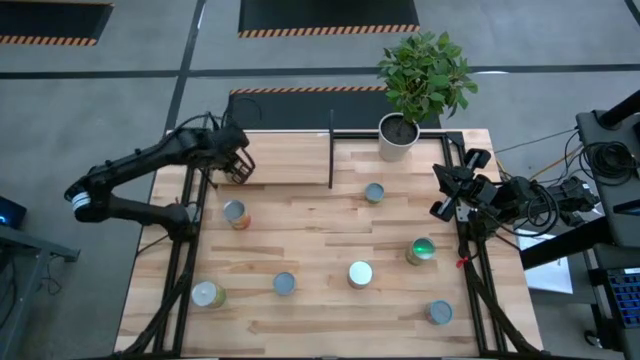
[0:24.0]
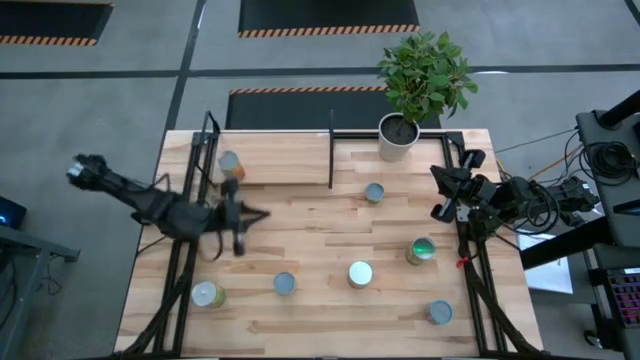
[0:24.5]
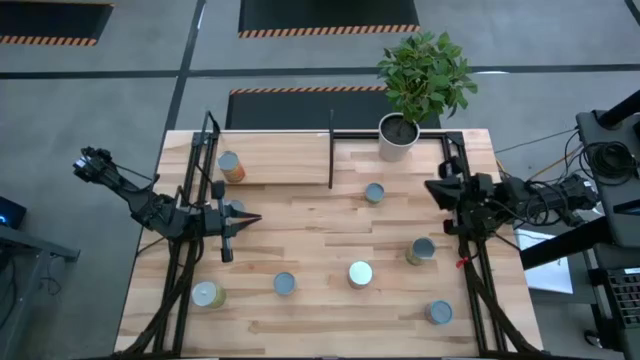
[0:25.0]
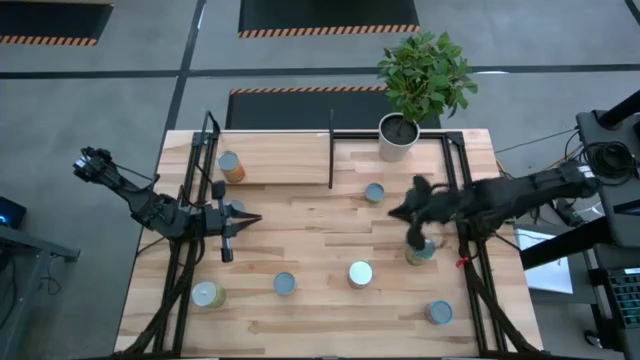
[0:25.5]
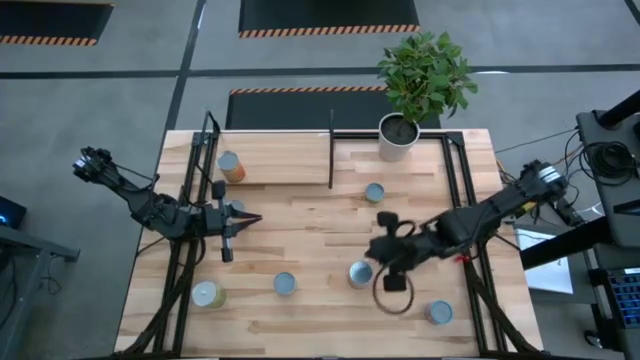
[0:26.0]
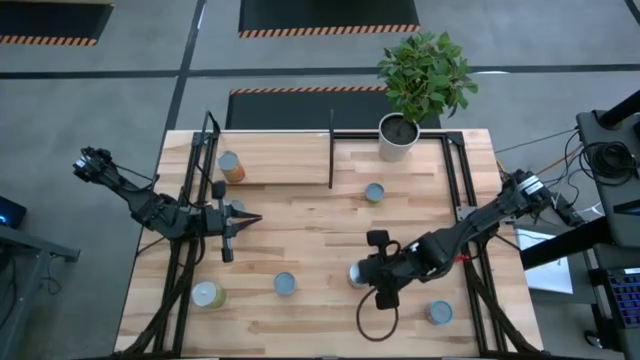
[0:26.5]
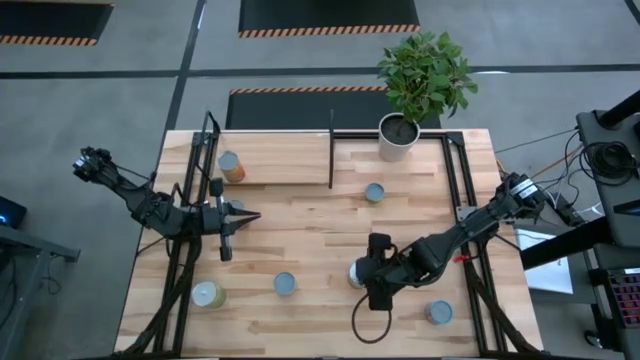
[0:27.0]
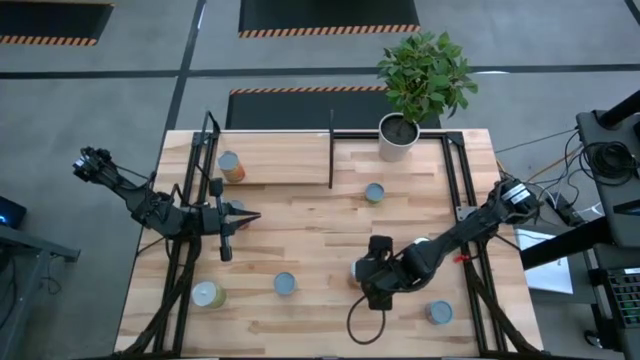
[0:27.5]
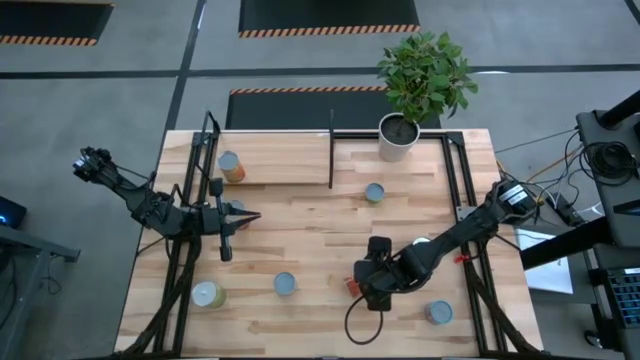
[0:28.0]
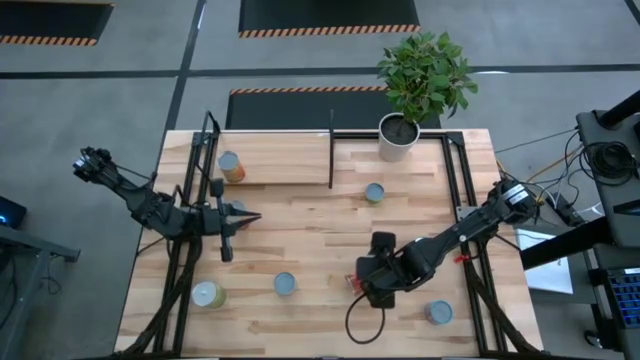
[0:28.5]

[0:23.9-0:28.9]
Task: Pick and place cans onto a shelf
Put the right orange corn can on the shelf

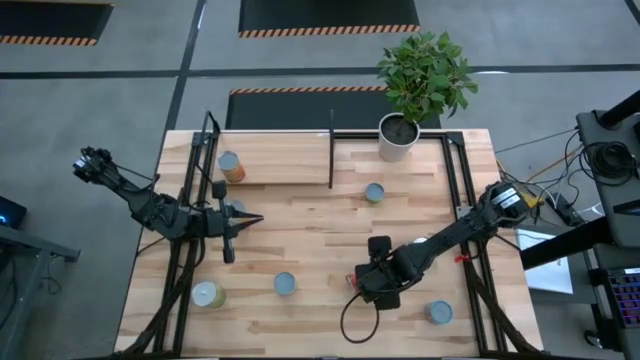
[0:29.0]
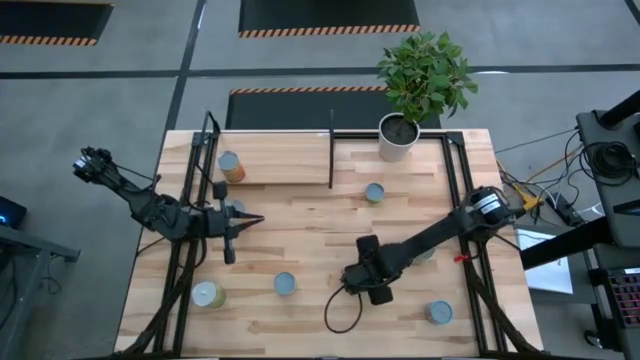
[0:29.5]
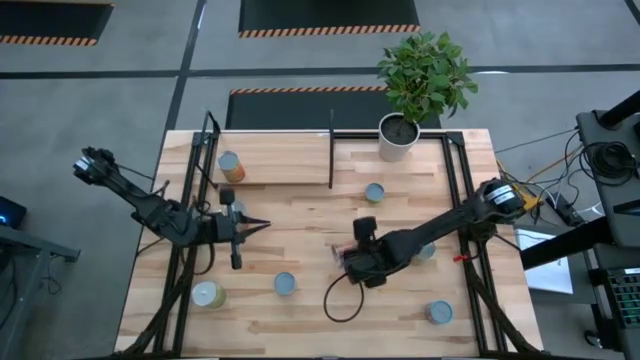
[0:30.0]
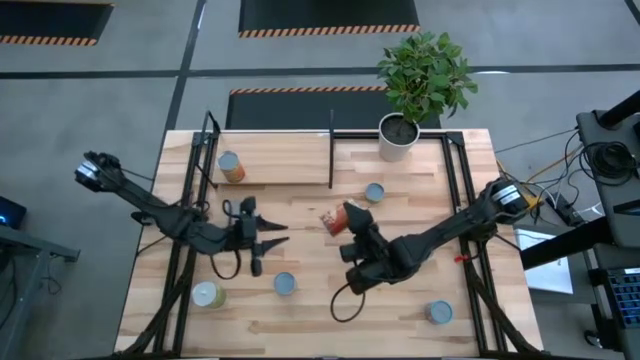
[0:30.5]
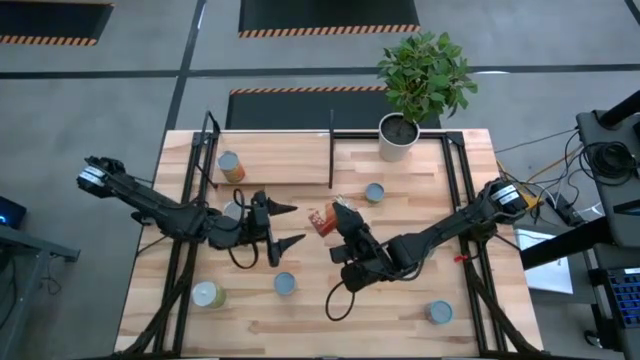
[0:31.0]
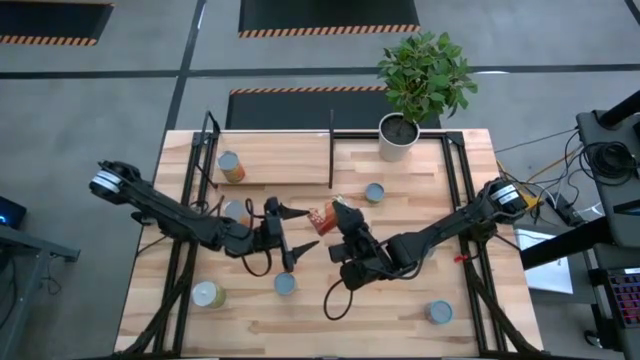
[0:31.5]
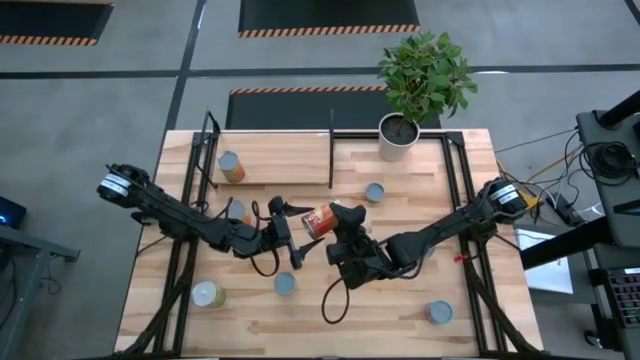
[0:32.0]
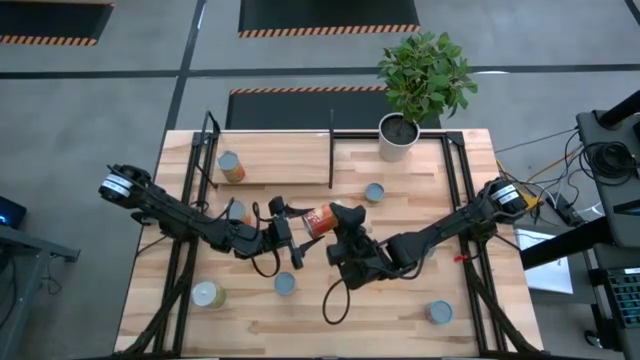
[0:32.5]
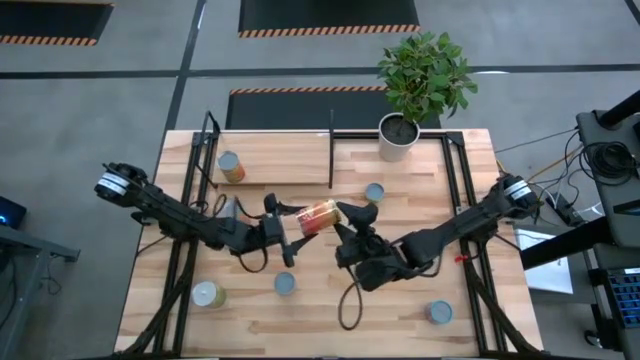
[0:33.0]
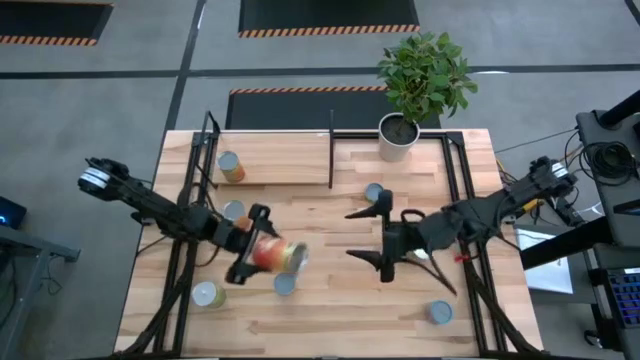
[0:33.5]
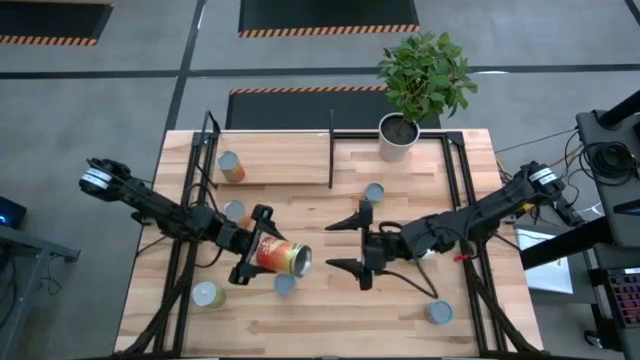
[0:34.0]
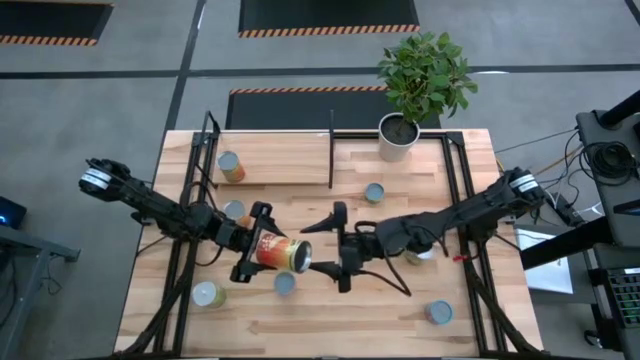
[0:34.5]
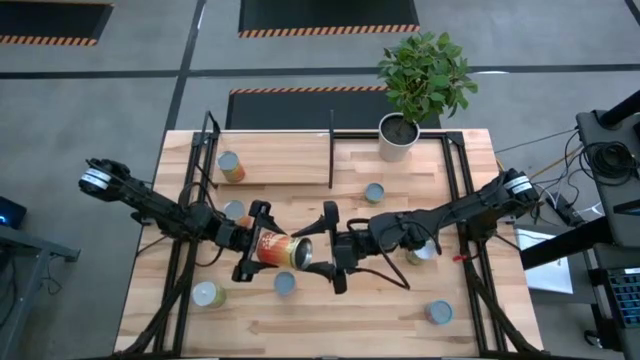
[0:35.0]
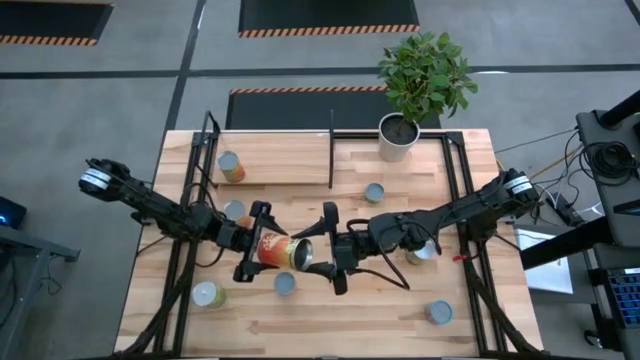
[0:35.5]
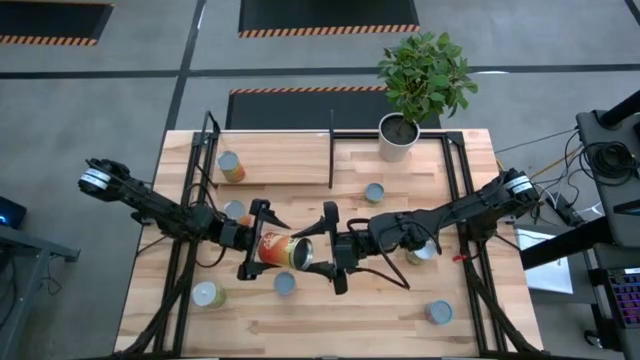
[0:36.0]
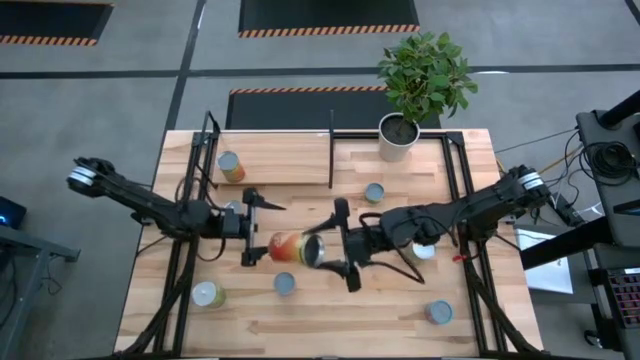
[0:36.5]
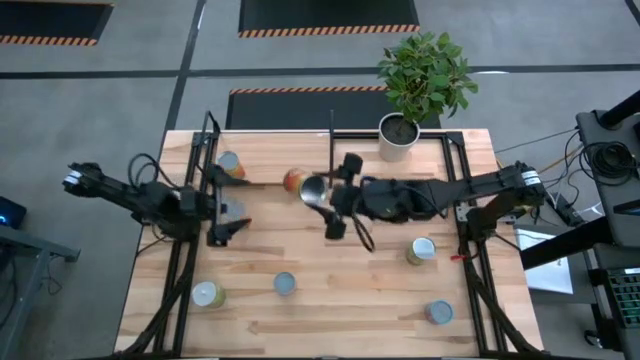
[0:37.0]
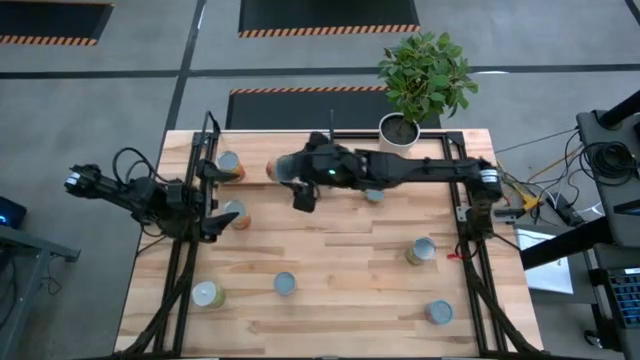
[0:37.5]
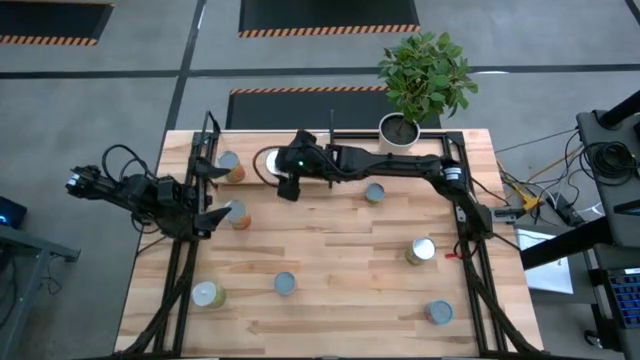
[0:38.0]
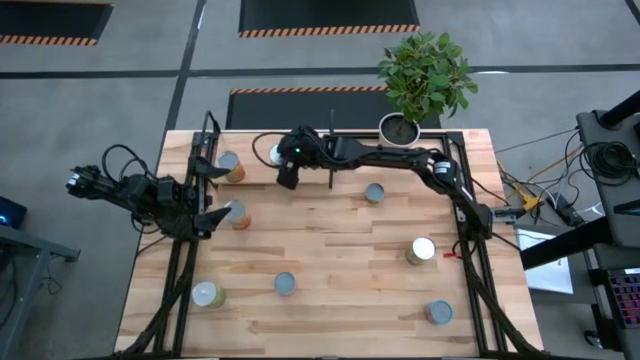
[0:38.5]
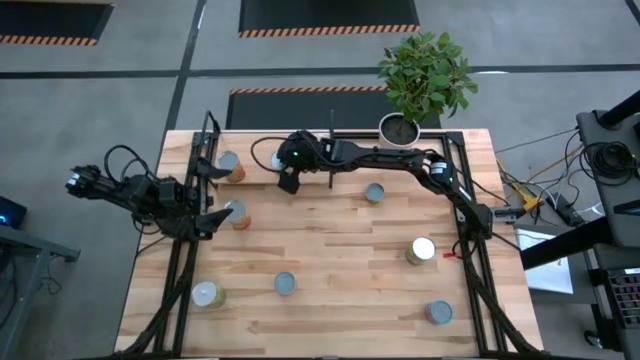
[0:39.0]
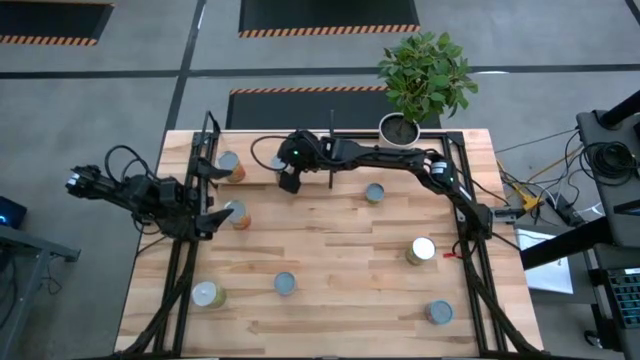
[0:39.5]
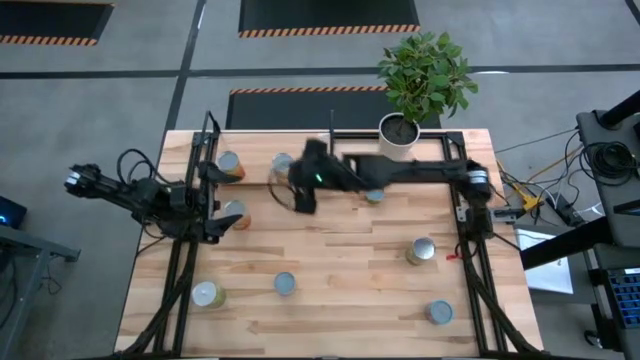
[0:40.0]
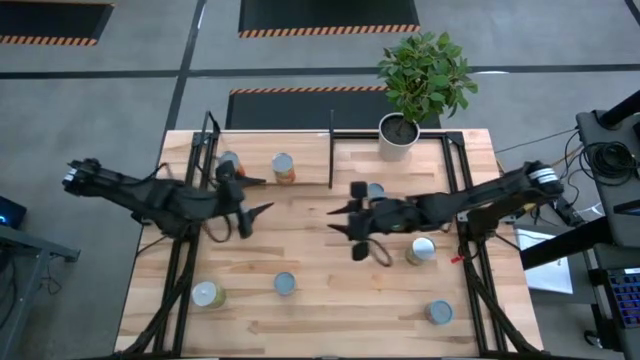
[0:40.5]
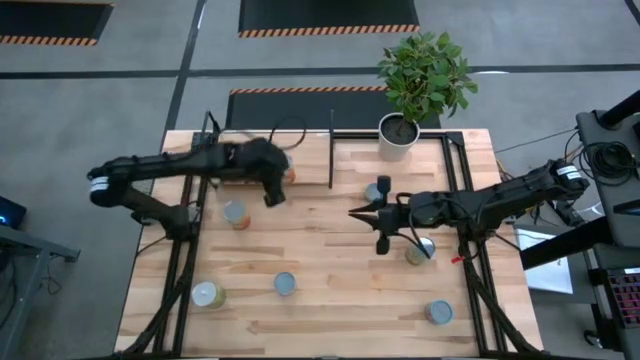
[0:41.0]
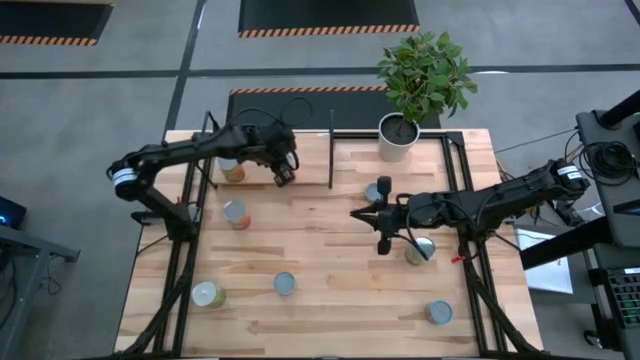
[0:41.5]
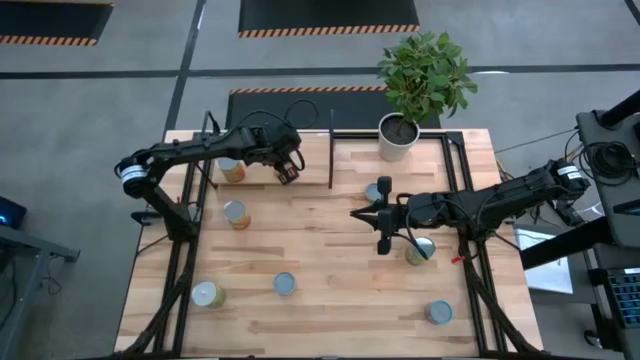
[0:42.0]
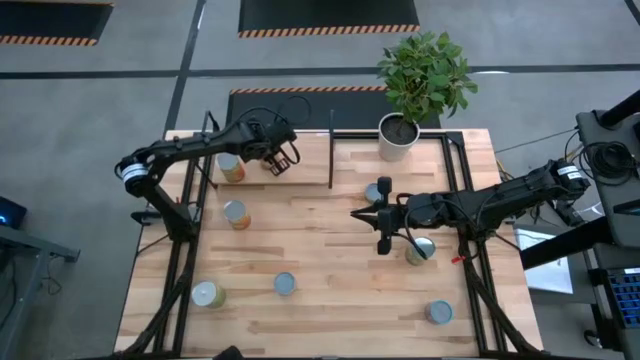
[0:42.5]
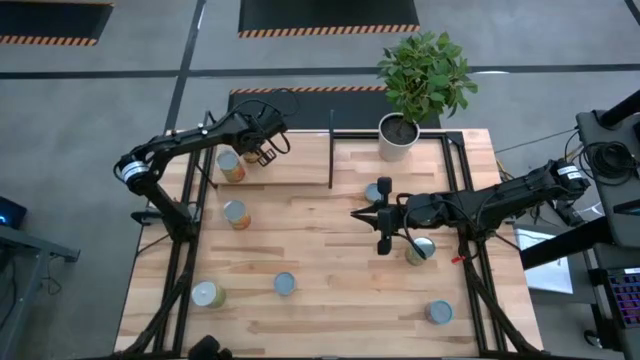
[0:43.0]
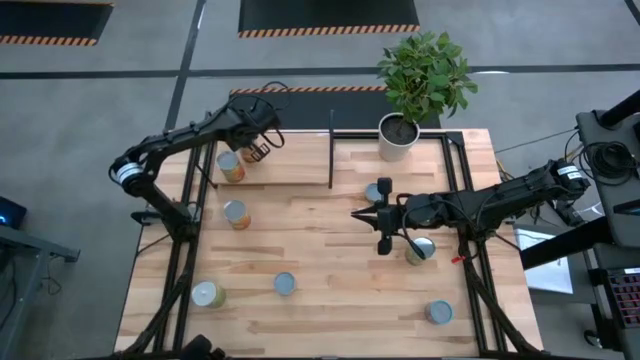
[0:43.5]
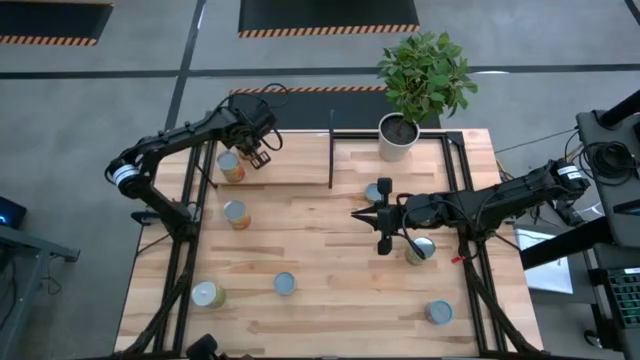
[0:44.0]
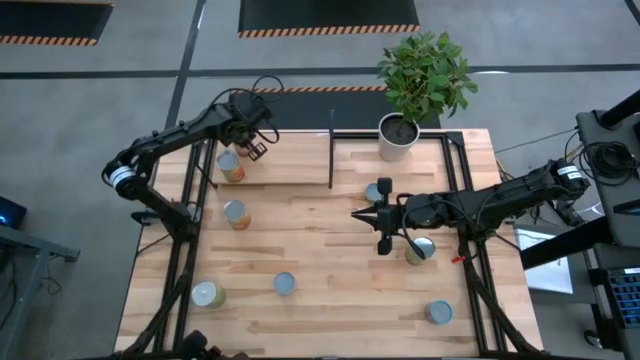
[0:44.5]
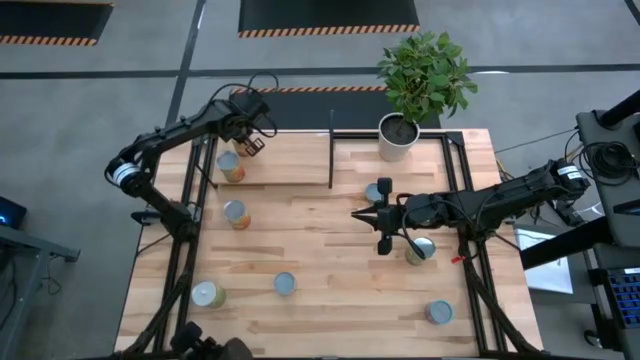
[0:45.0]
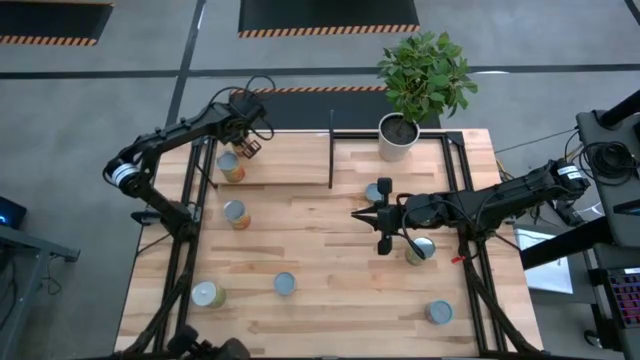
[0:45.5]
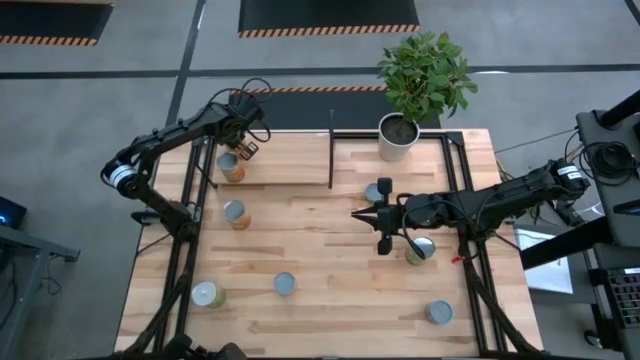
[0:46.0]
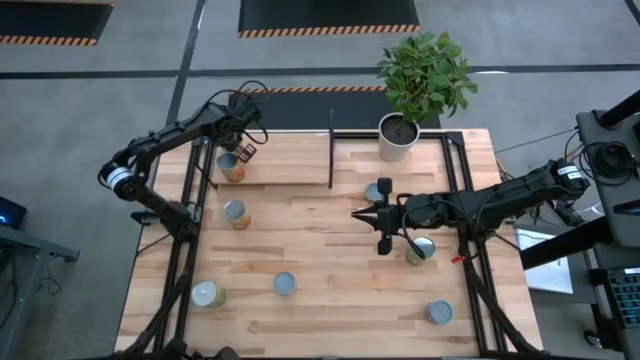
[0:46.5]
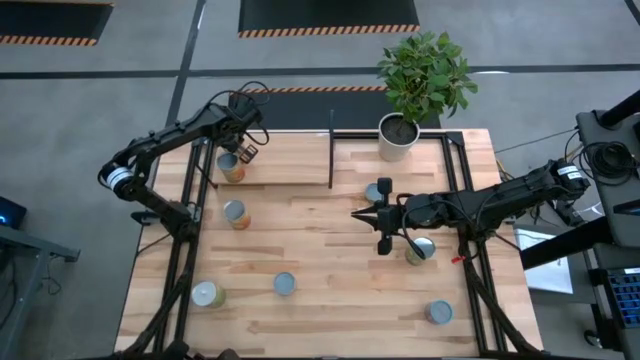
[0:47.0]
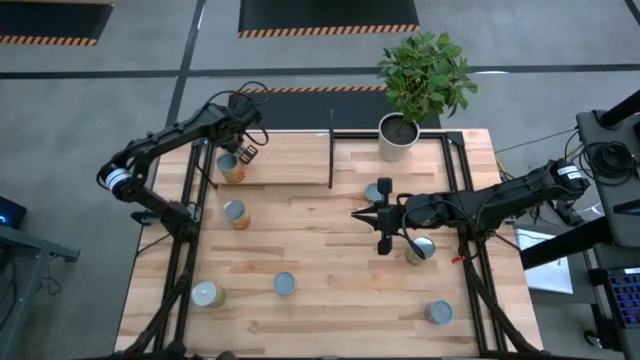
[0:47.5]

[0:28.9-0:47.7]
Put the right orange corn can on the shelf
